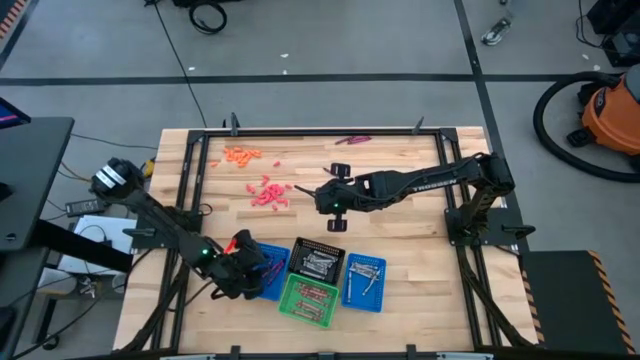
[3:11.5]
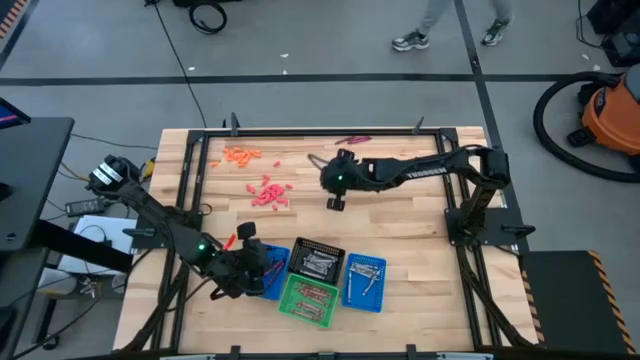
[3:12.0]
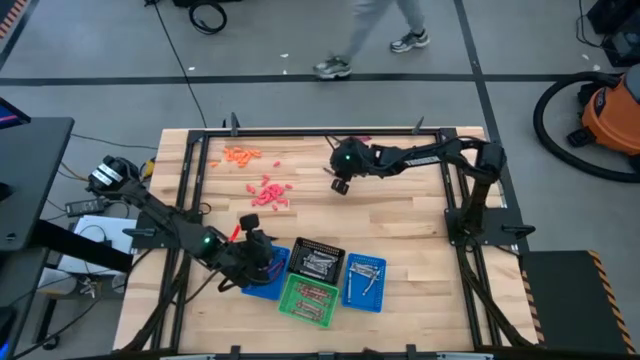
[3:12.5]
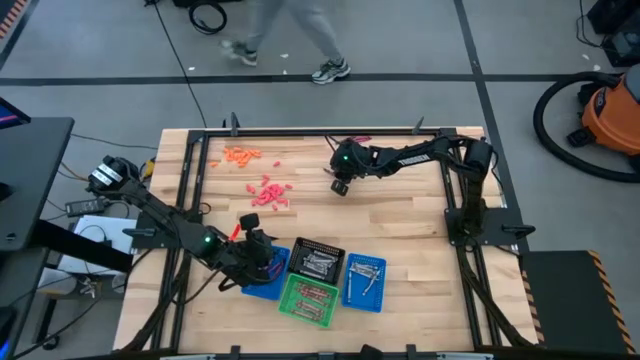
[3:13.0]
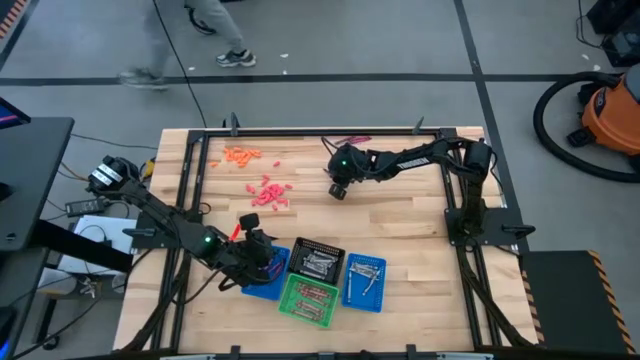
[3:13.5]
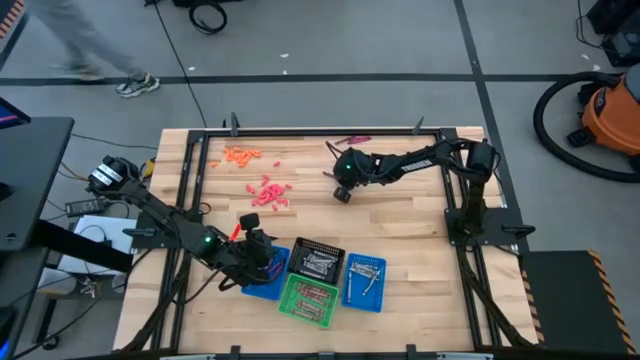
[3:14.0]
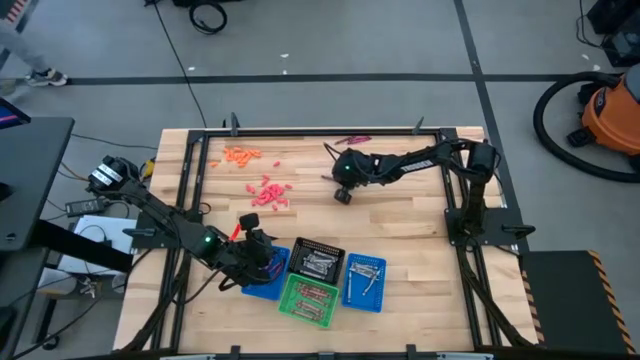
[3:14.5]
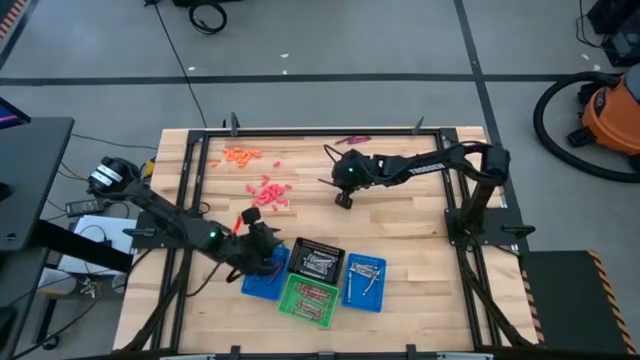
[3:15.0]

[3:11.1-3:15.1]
Task: Sort crayons
Put the dark red crayon into the left blue bin

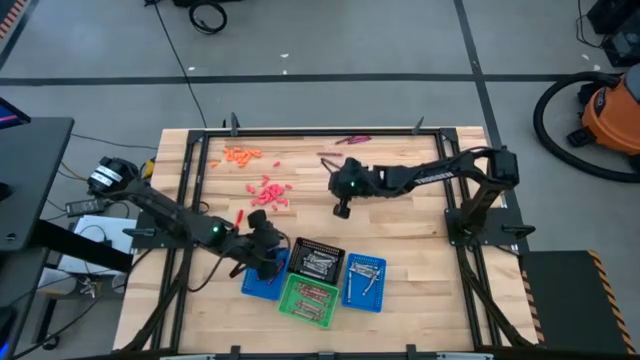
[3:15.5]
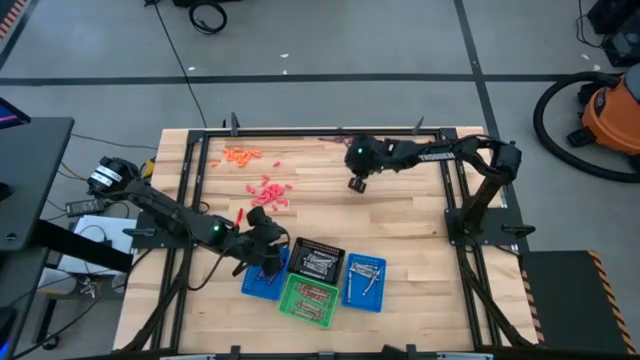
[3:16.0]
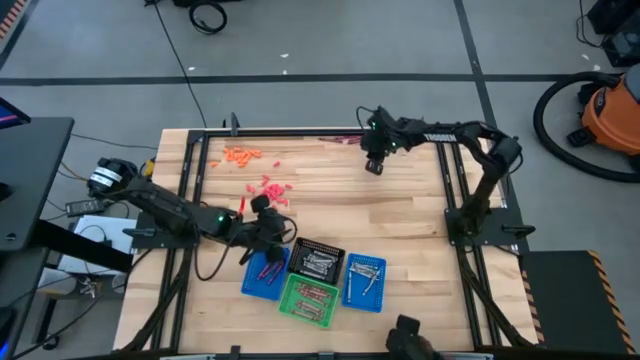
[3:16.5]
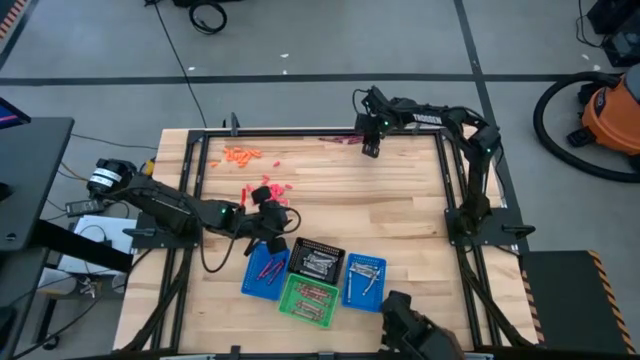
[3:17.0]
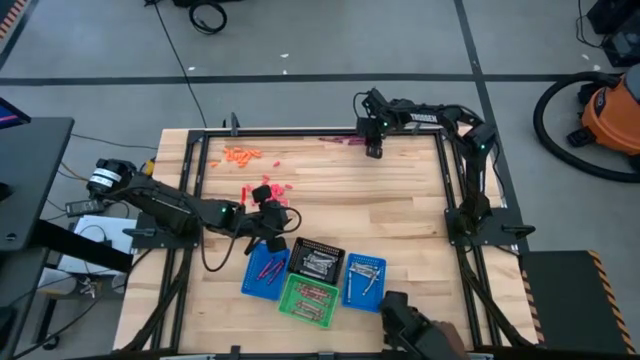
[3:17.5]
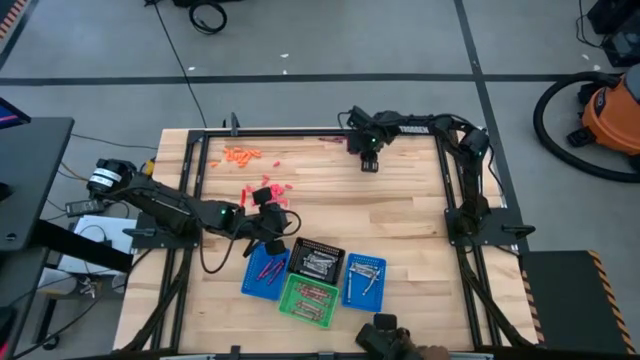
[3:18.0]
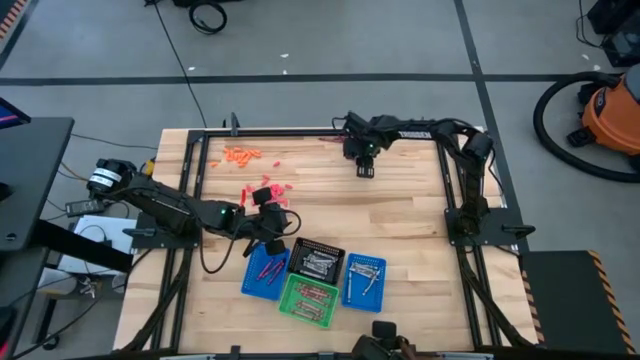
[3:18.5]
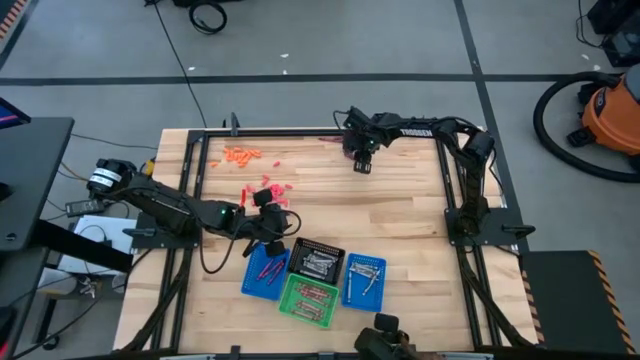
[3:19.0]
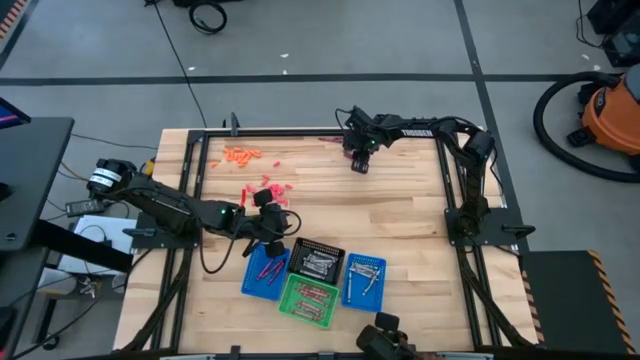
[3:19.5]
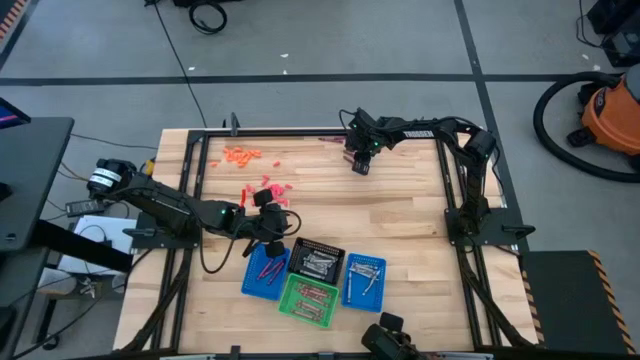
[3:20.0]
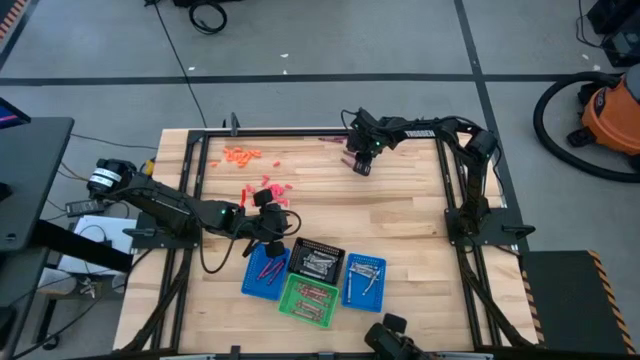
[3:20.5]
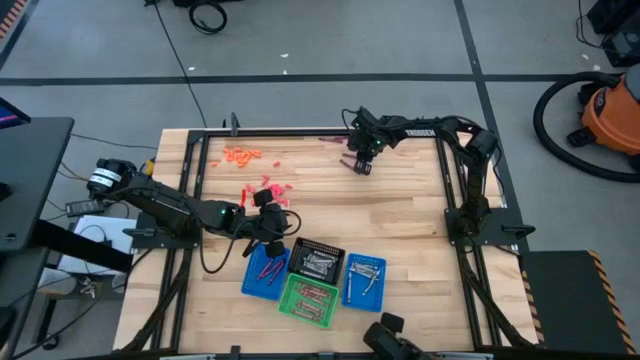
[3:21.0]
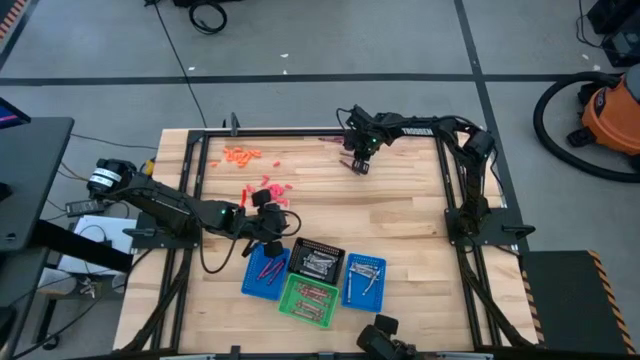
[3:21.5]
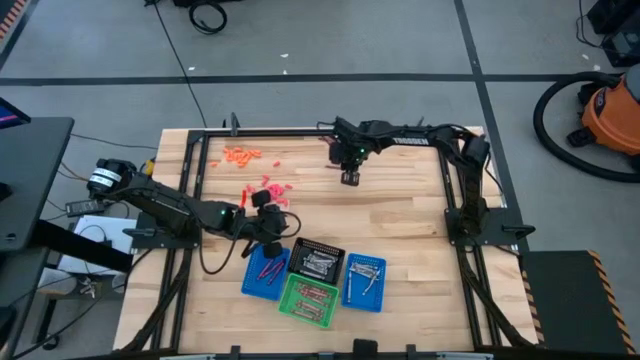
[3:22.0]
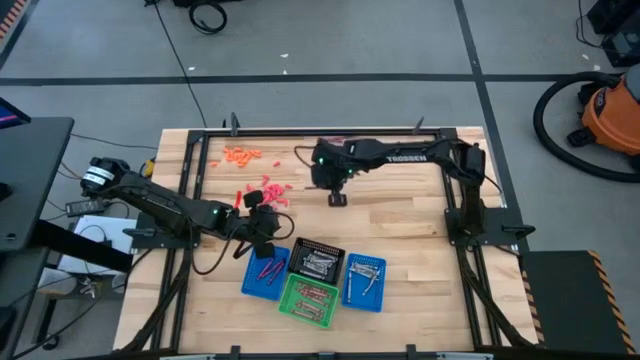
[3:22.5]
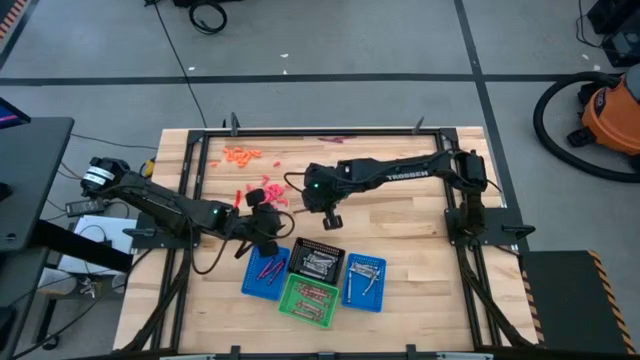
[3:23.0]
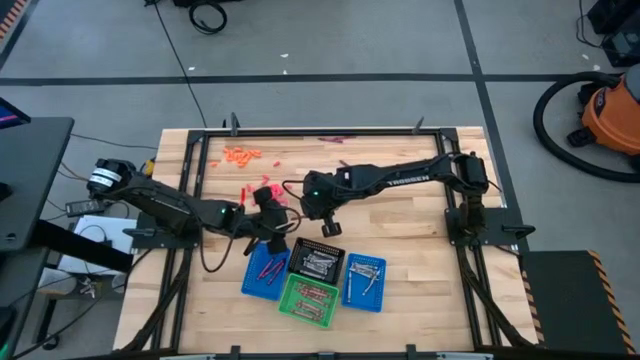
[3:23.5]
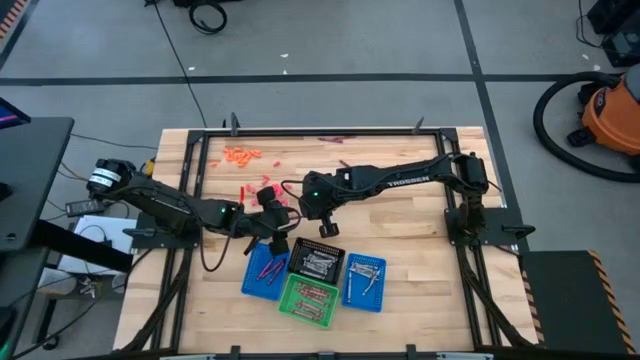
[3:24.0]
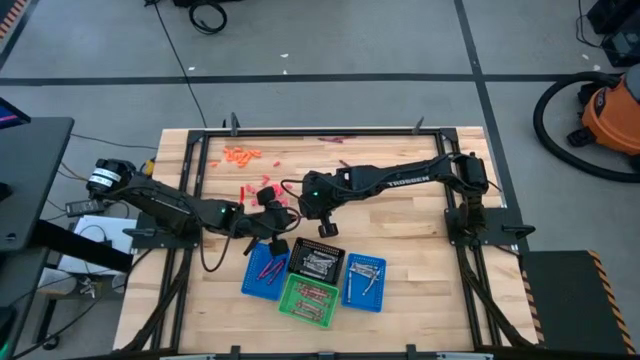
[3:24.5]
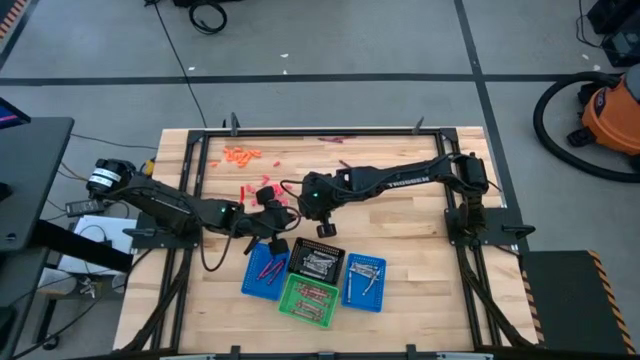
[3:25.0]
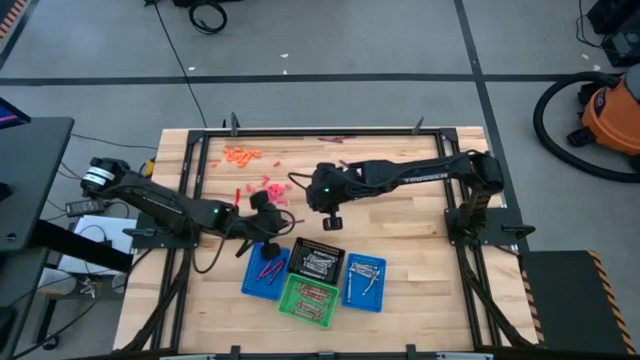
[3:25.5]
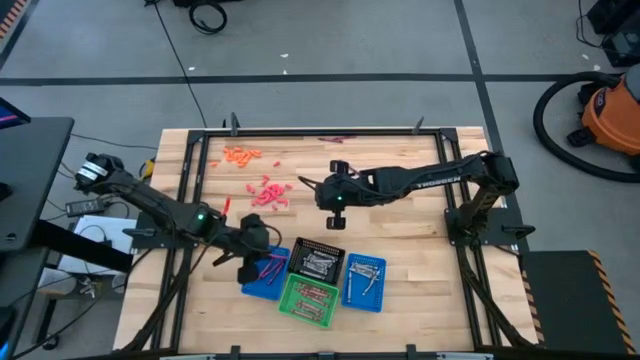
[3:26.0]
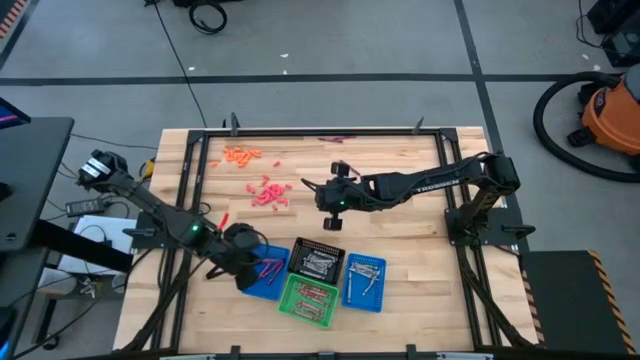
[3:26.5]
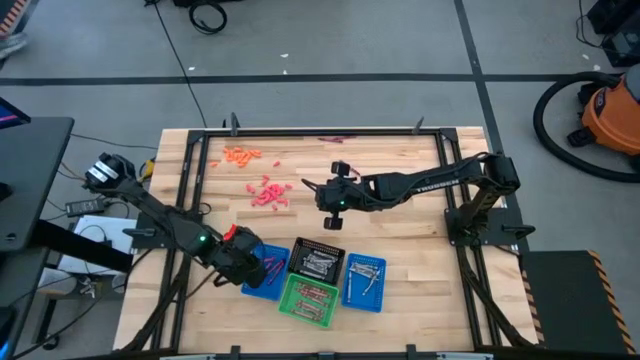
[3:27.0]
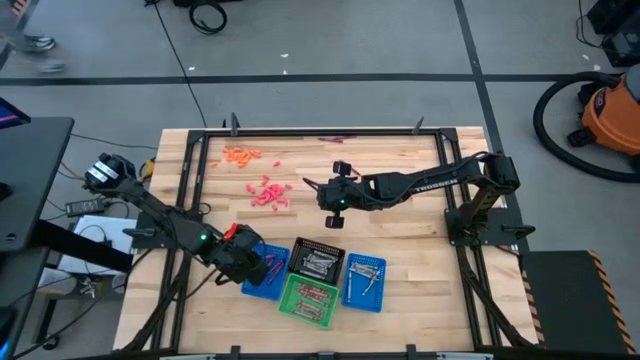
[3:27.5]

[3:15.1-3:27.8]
Put the dark red crayon into the left blue bin
